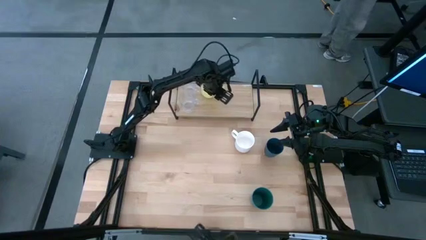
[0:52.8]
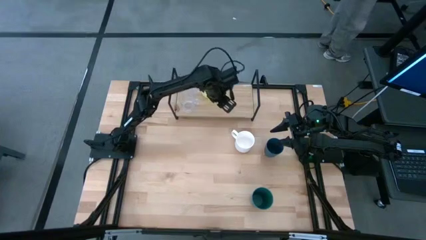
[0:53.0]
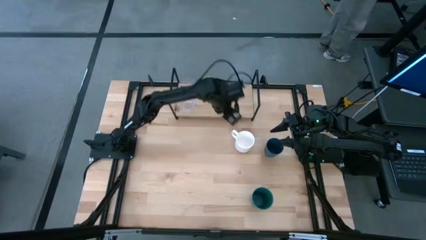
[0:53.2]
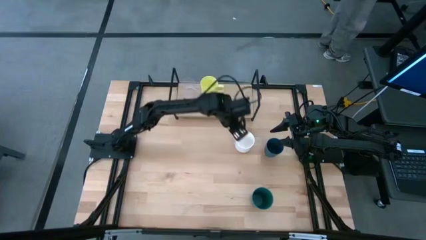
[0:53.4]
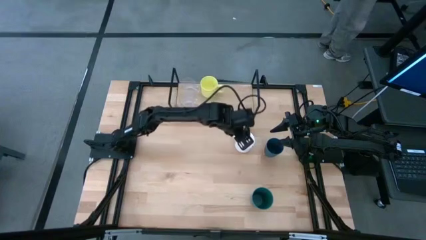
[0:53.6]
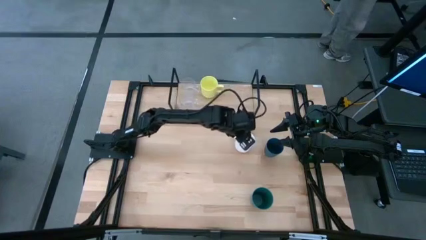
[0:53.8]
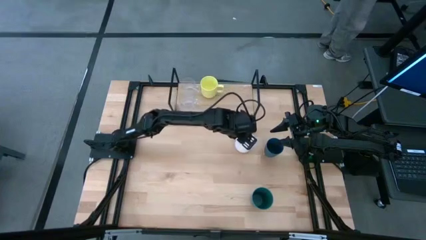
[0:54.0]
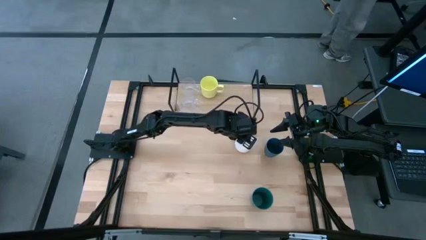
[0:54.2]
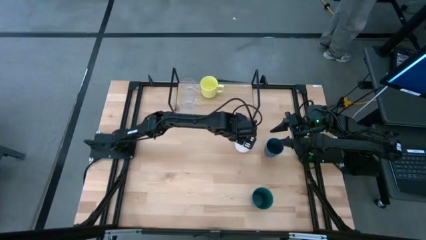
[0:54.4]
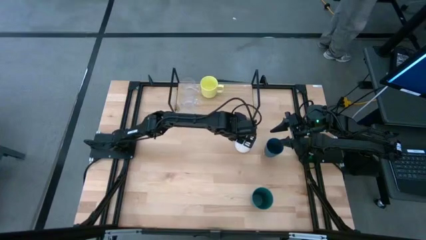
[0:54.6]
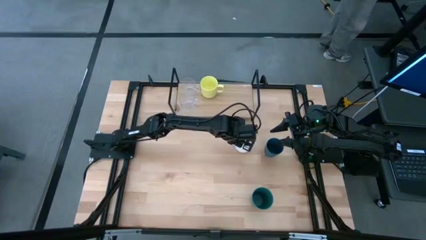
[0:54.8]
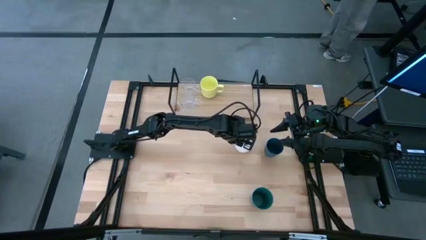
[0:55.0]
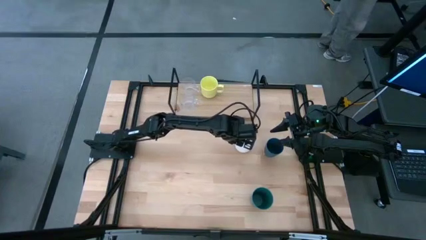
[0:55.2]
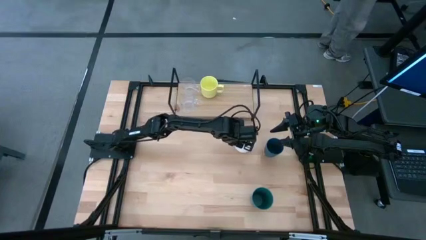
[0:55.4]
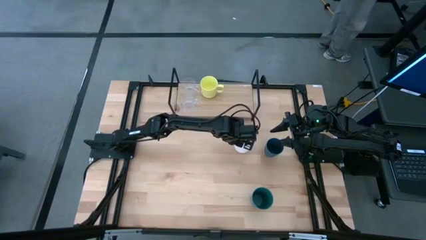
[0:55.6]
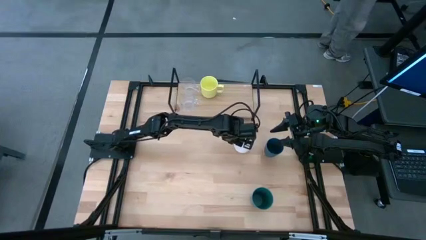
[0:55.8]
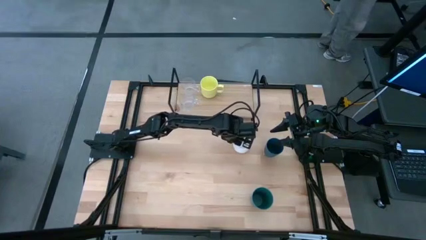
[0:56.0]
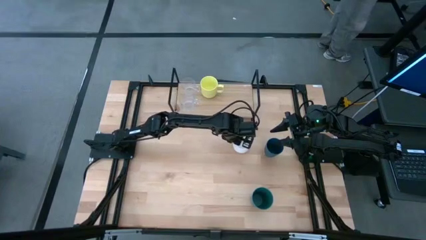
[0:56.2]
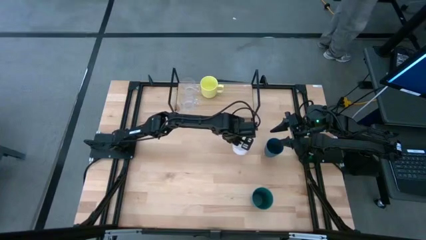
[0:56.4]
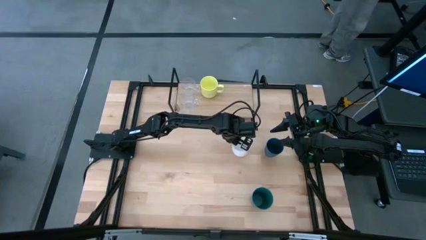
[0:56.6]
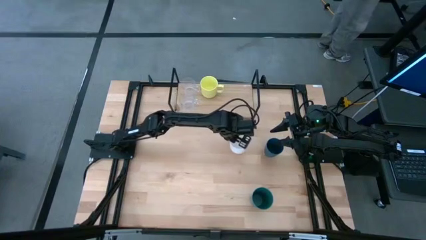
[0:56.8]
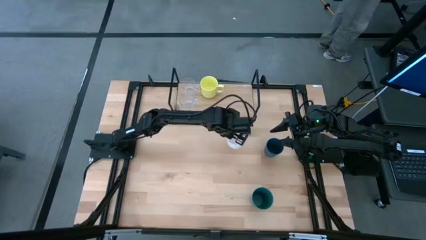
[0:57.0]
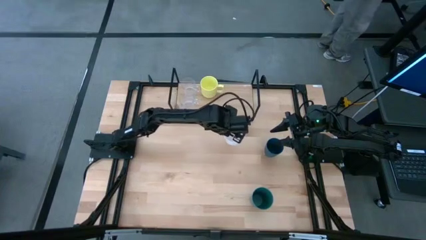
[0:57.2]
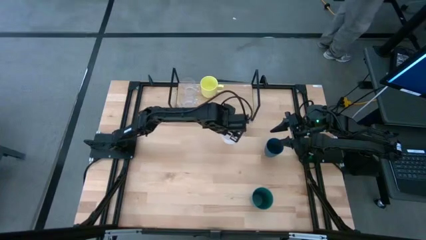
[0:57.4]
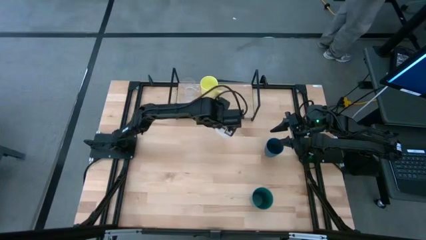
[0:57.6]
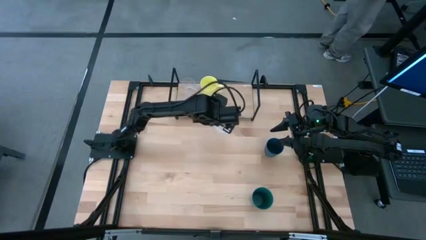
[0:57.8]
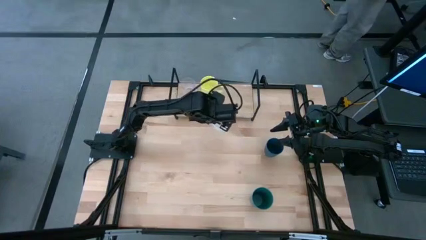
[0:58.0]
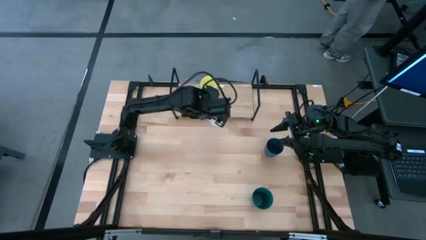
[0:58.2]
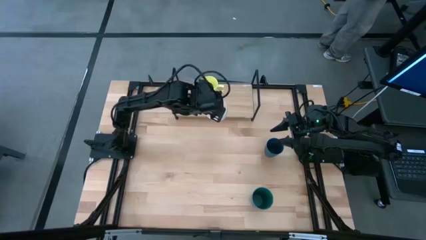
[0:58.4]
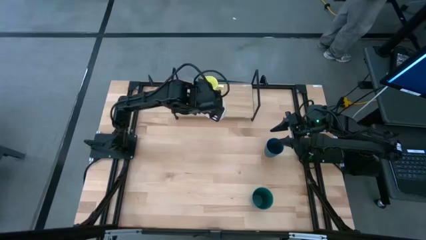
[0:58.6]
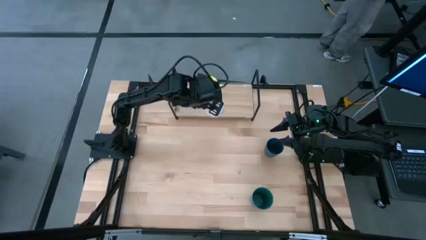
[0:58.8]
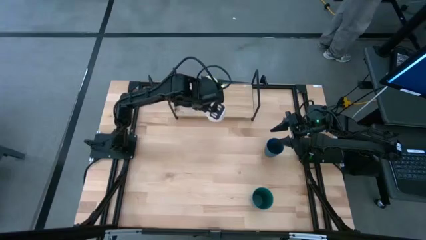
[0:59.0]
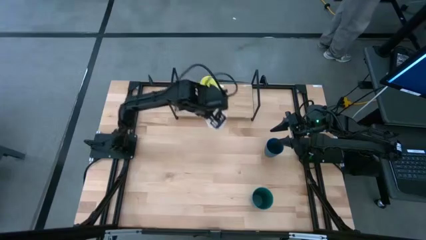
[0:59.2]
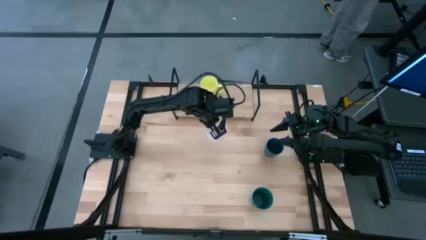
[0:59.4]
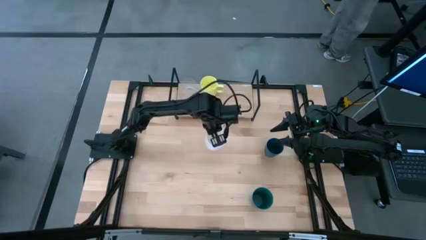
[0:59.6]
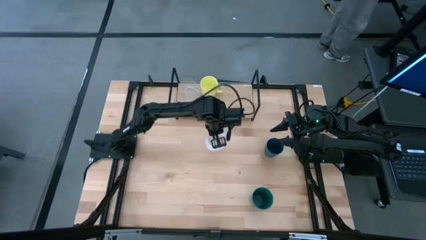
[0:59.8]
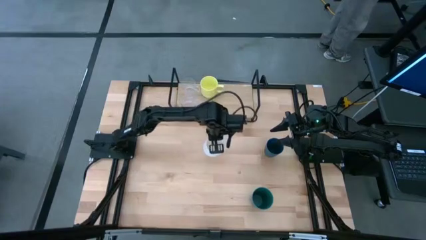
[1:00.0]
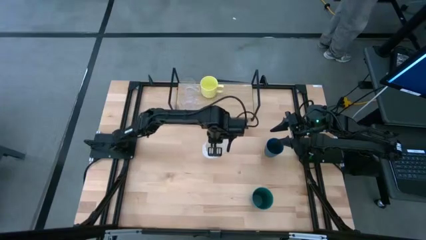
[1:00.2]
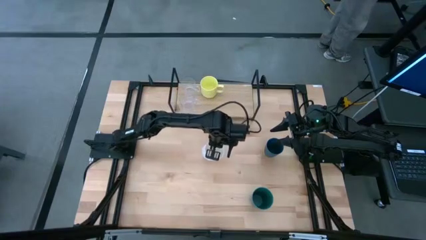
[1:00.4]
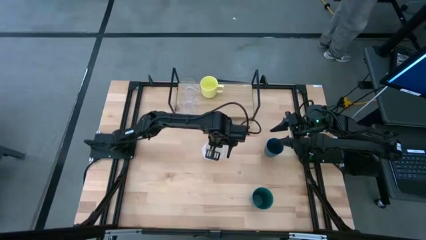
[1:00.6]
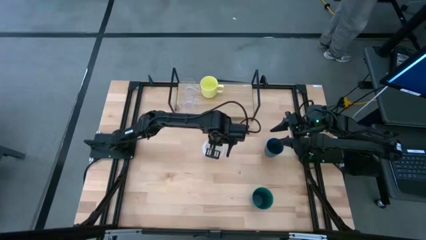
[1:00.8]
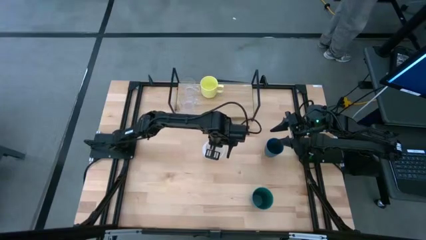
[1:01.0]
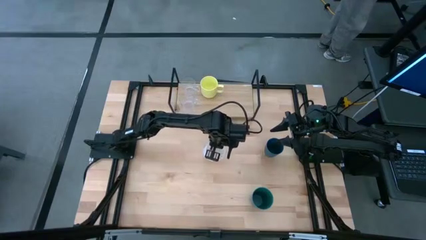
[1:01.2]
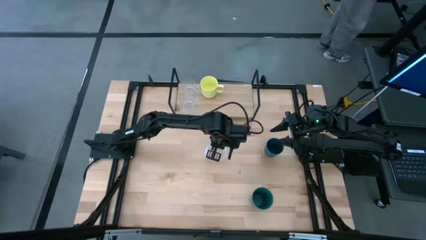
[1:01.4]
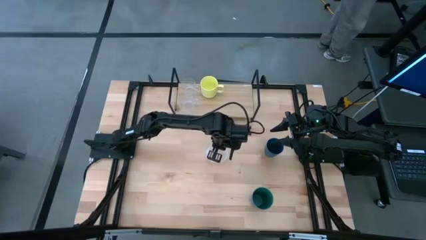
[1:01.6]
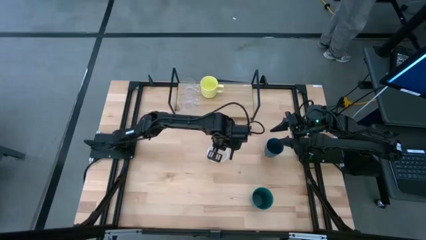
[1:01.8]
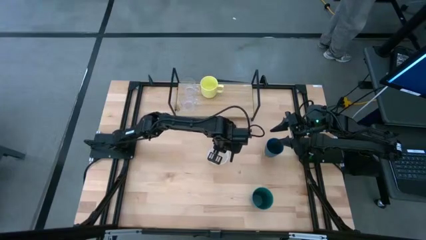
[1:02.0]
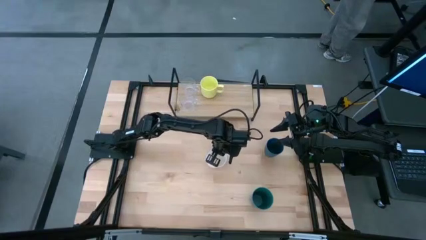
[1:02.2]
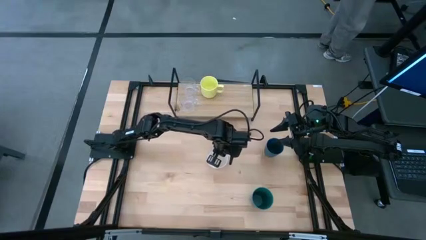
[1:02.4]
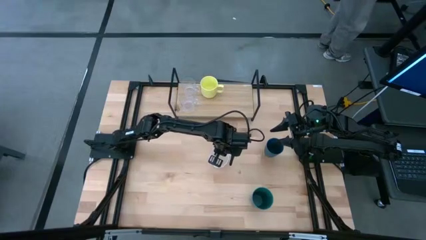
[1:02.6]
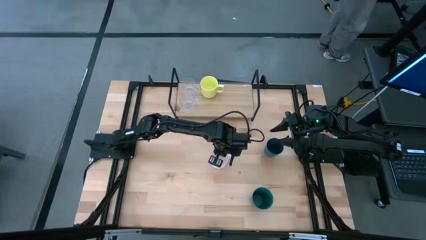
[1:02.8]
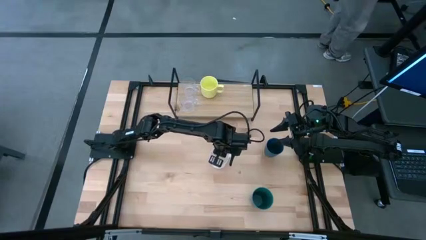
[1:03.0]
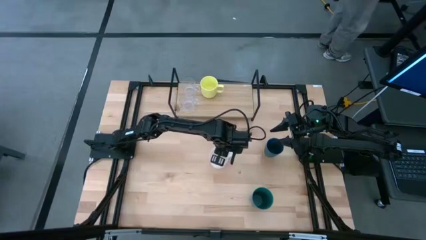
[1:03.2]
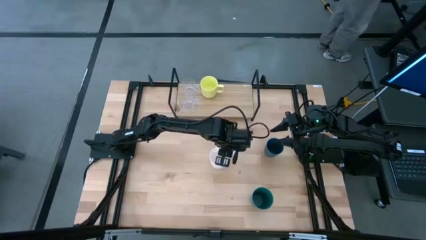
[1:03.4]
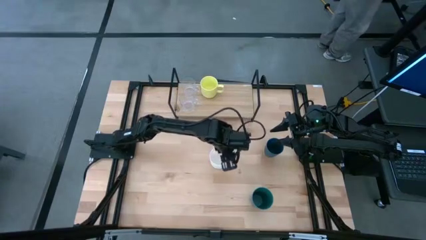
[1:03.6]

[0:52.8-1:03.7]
Task: Stack small to large cups/mugs on shelf
Put the white mug on the shelf

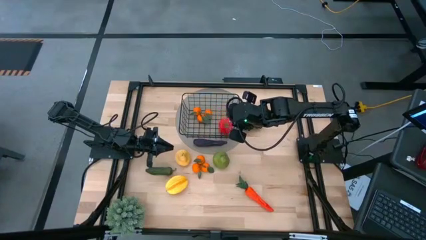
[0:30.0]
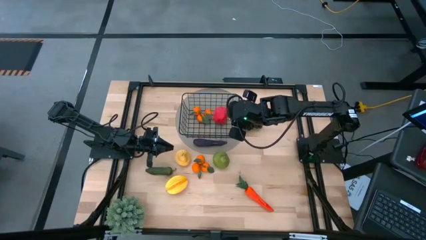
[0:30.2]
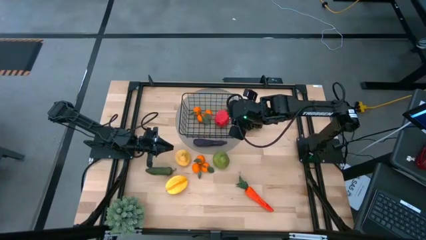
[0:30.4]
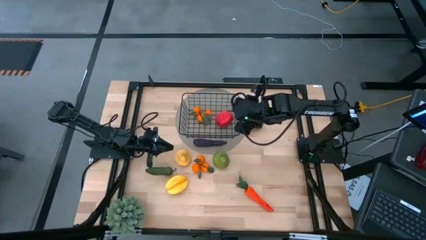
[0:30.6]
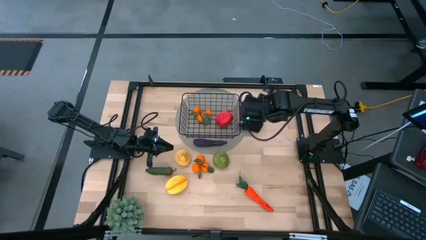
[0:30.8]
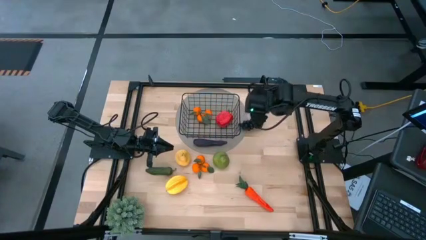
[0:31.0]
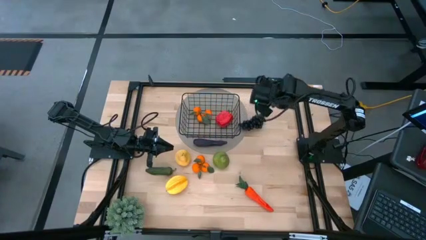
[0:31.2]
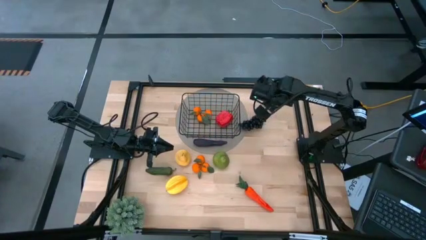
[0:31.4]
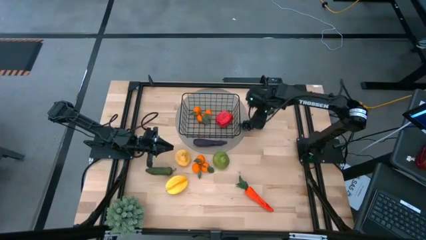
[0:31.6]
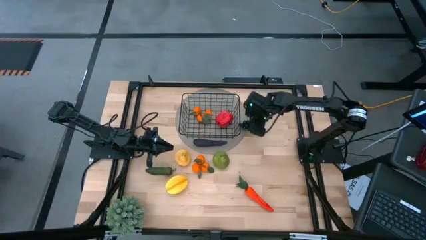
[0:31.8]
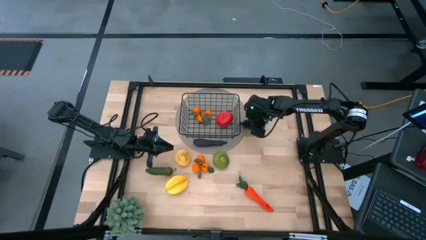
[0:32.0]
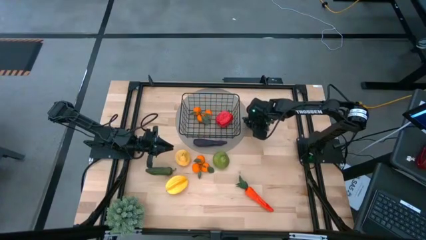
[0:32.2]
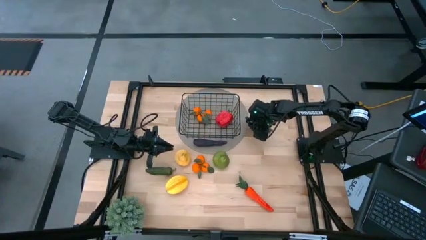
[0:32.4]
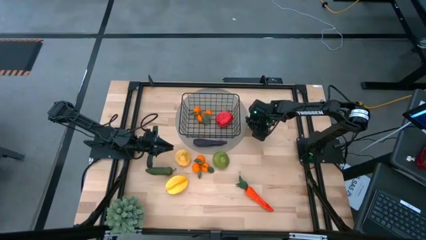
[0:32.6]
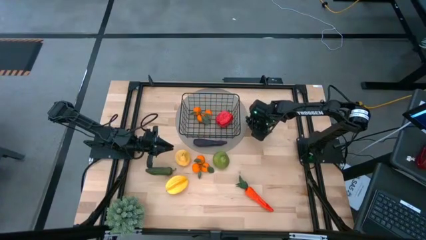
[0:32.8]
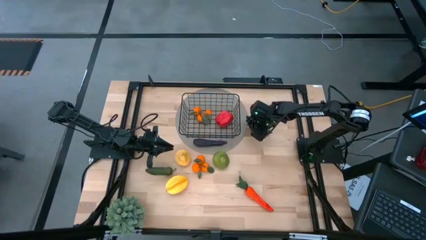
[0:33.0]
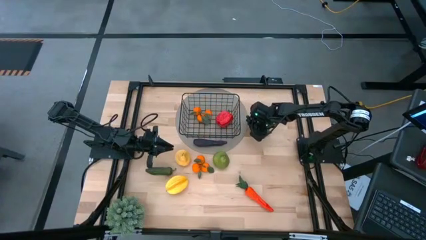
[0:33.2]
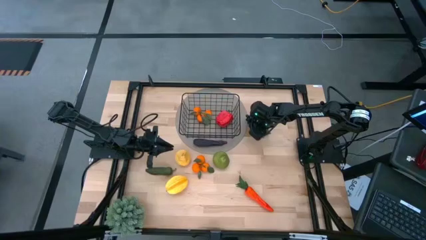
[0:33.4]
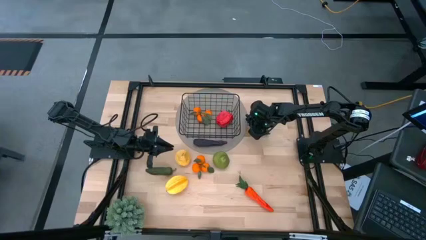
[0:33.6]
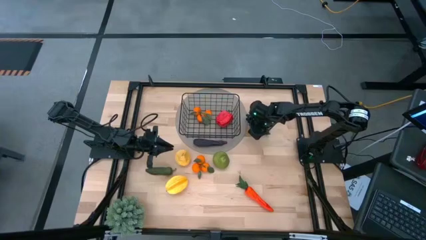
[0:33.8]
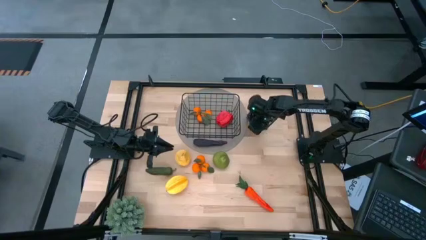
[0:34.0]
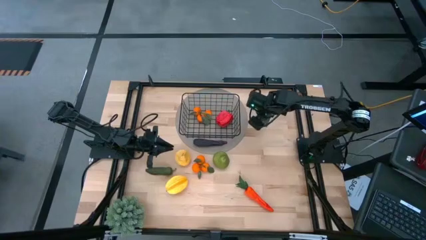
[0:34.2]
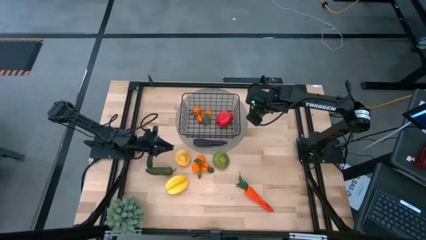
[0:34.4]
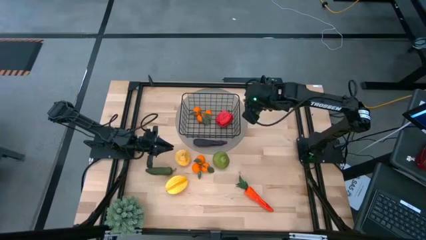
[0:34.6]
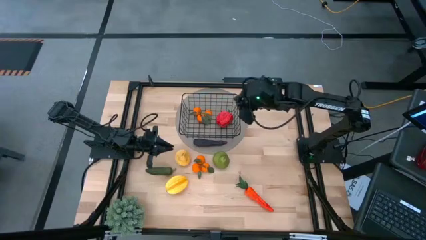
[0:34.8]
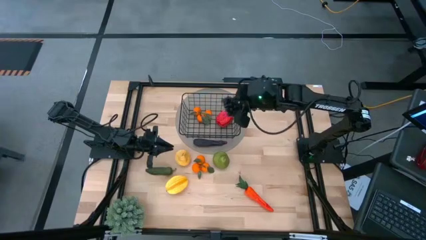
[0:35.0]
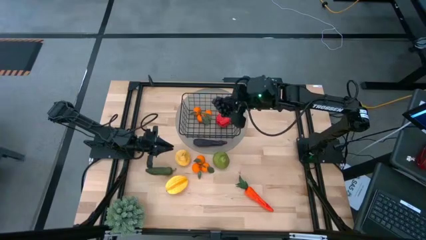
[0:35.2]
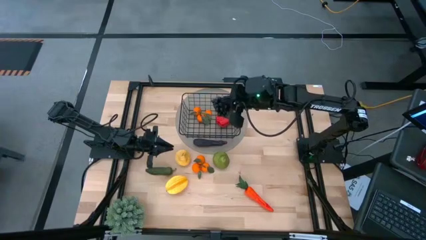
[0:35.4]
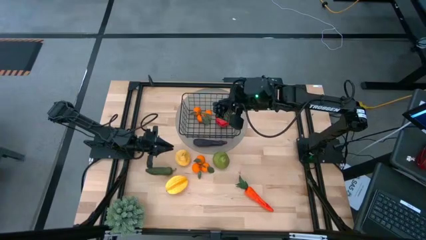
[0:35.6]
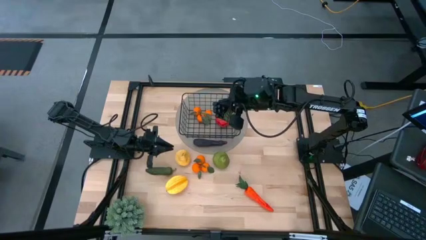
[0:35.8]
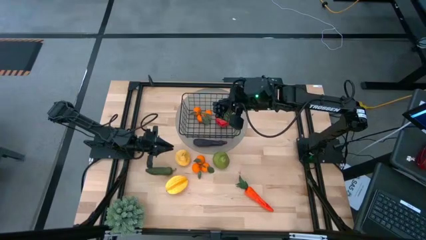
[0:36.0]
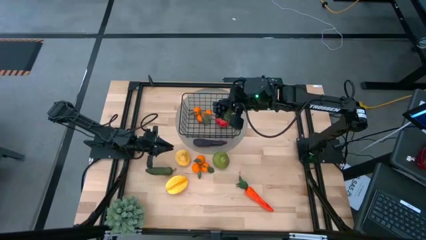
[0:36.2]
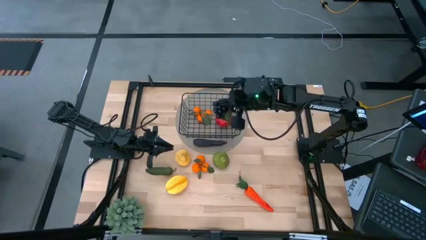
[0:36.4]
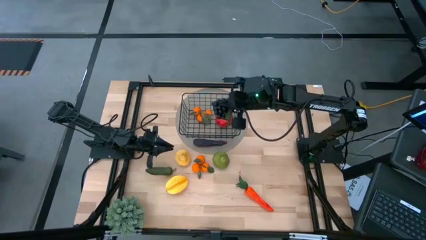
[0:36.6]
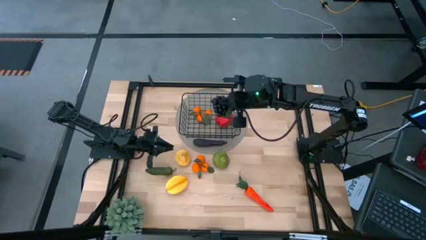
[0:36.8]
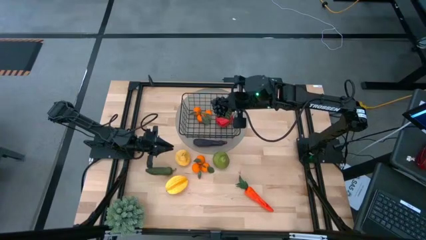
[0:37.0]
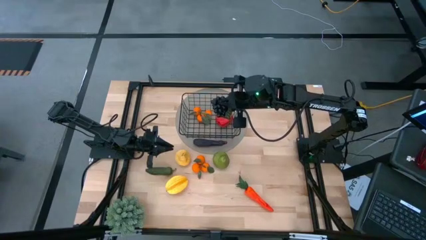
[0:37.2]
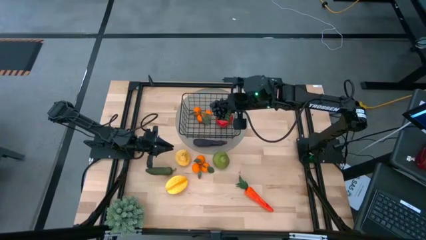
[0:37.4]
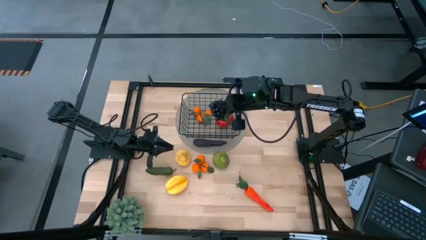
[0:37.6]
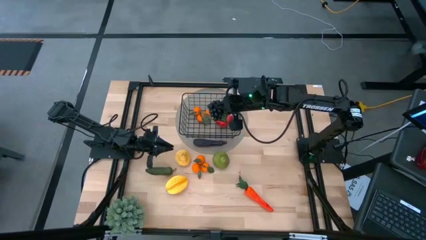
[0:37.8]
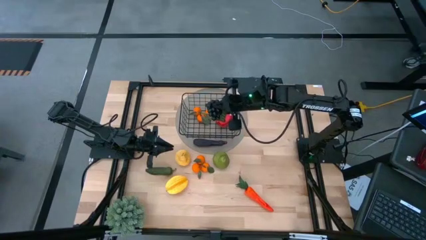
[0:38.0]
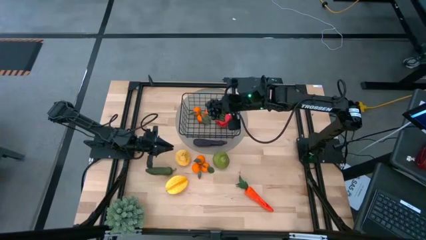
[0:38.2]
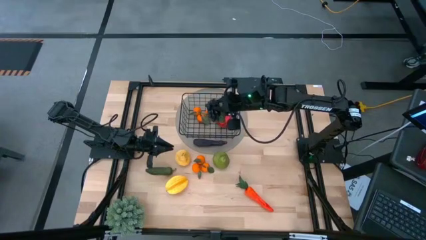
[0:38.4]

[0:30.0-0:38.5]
Task: Build produce basket
Put the grapes into the wire organizer
